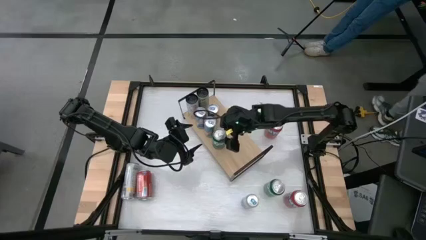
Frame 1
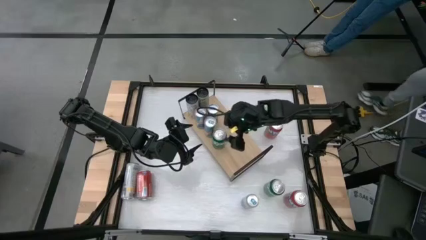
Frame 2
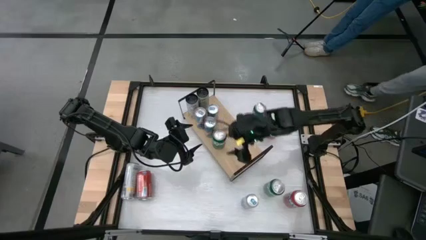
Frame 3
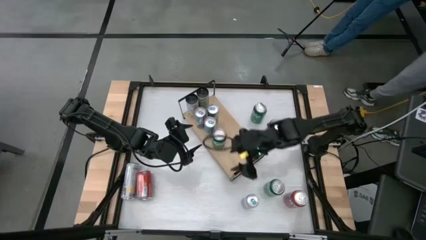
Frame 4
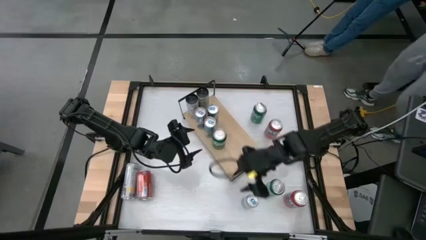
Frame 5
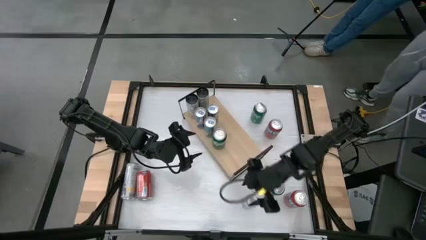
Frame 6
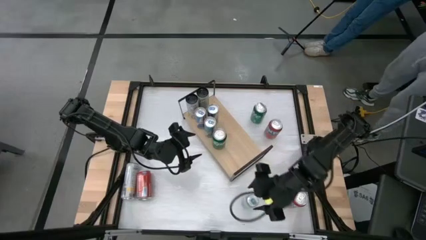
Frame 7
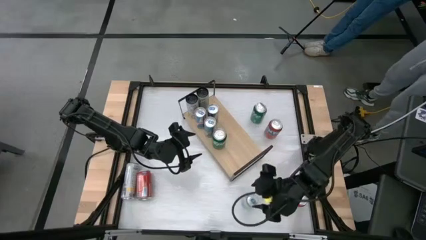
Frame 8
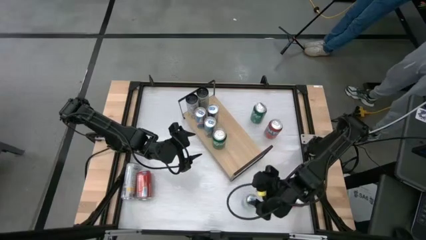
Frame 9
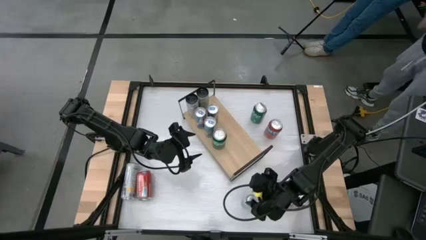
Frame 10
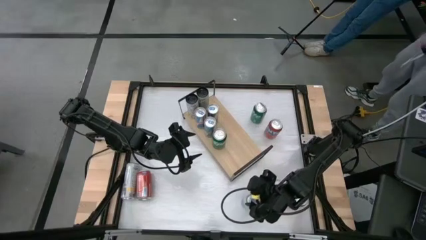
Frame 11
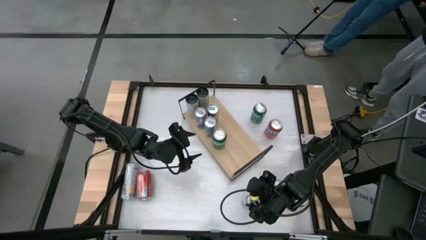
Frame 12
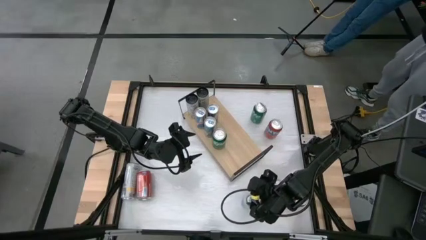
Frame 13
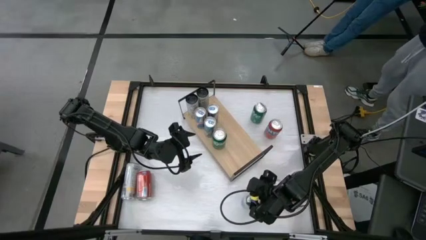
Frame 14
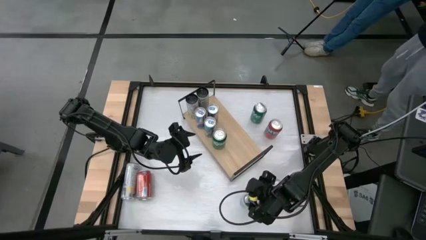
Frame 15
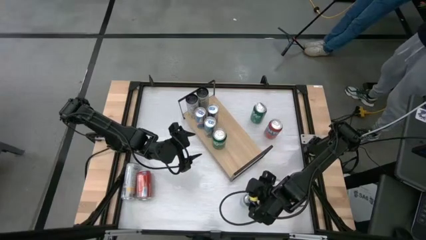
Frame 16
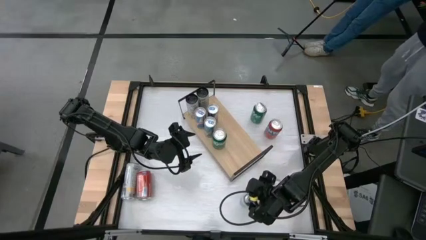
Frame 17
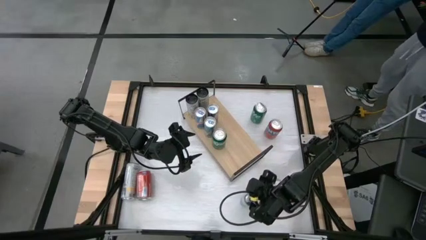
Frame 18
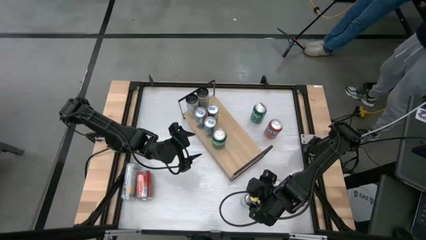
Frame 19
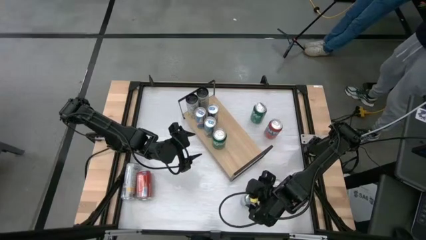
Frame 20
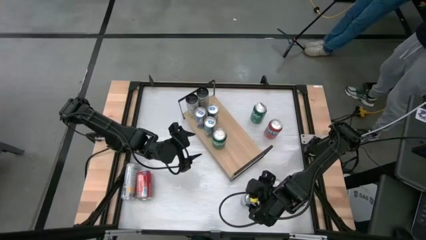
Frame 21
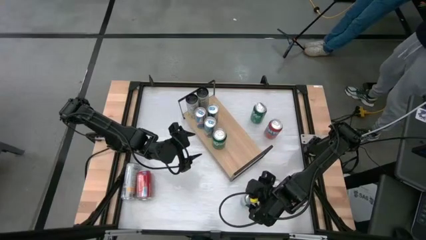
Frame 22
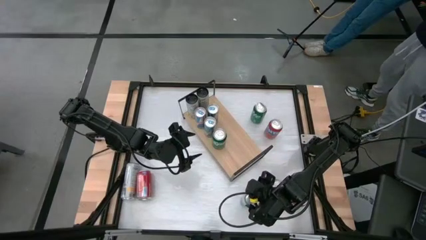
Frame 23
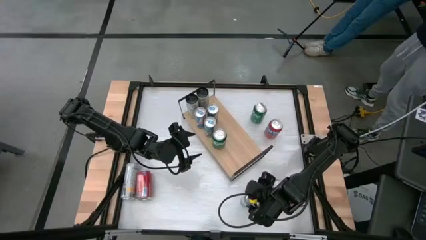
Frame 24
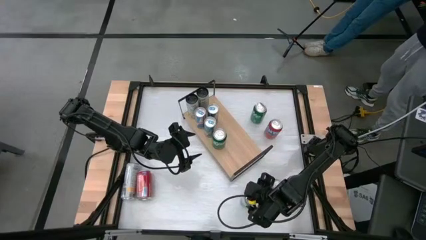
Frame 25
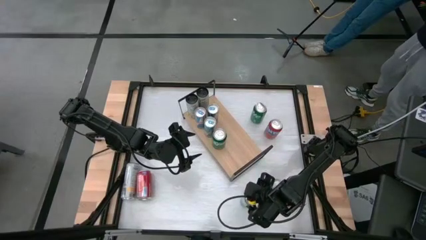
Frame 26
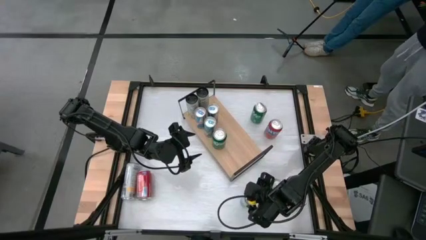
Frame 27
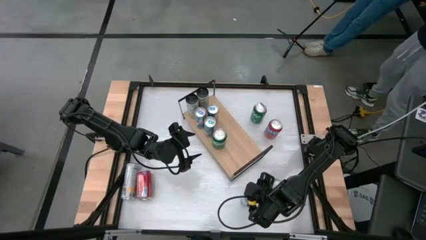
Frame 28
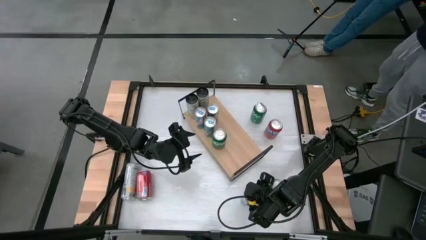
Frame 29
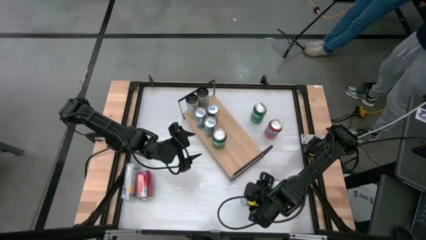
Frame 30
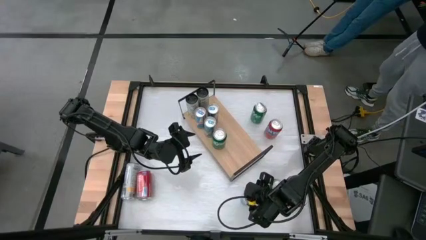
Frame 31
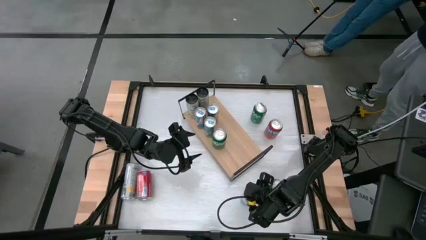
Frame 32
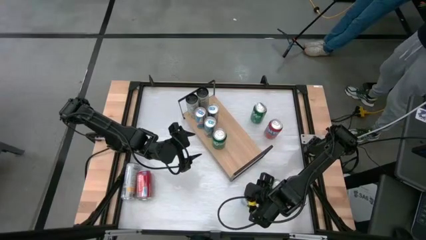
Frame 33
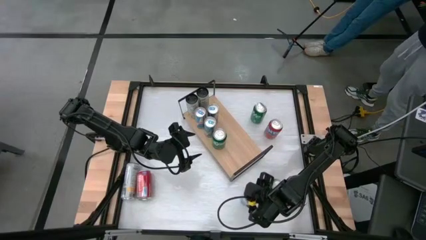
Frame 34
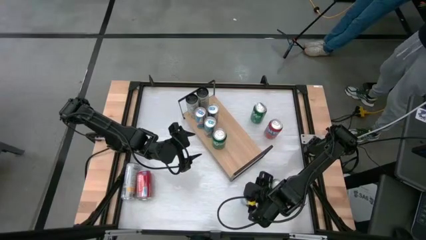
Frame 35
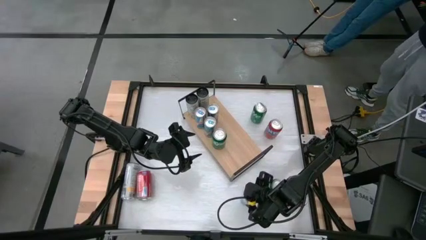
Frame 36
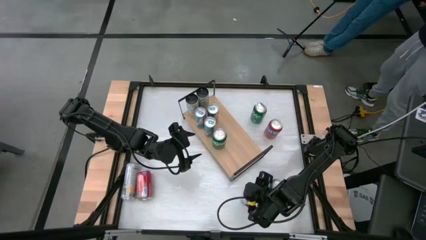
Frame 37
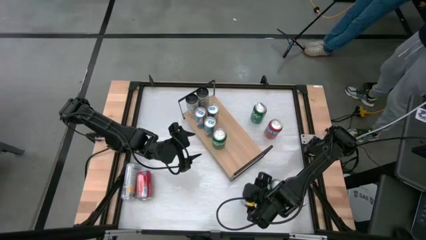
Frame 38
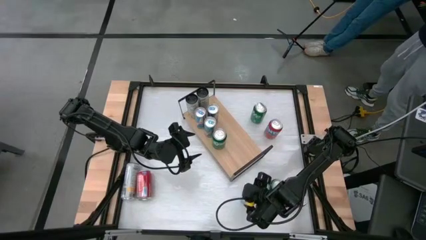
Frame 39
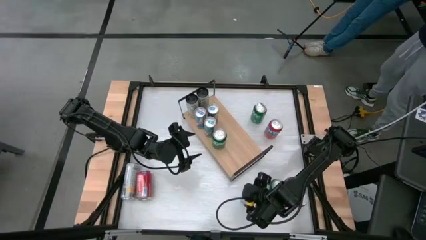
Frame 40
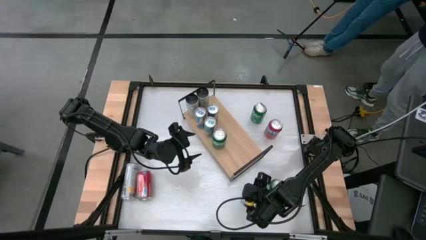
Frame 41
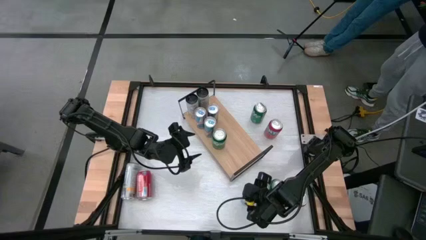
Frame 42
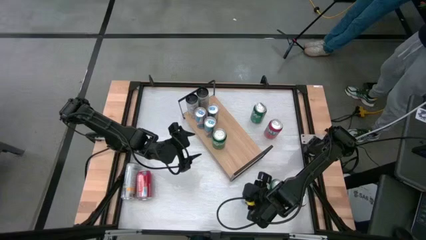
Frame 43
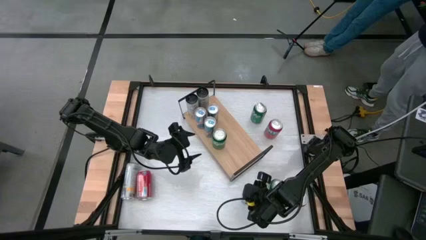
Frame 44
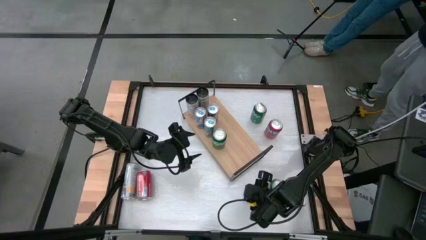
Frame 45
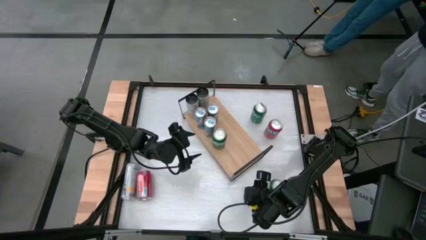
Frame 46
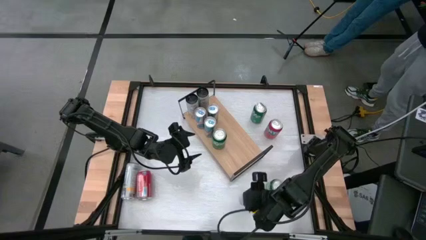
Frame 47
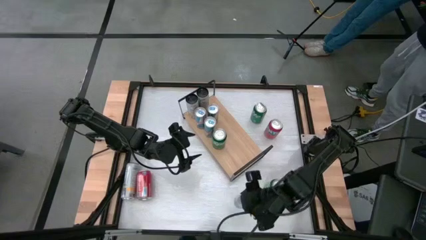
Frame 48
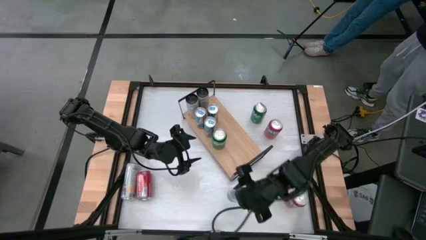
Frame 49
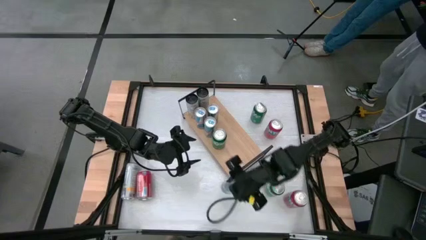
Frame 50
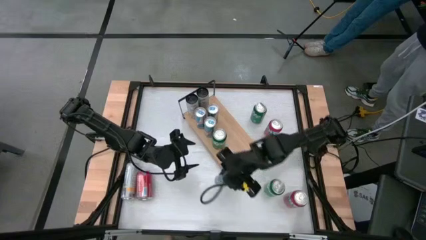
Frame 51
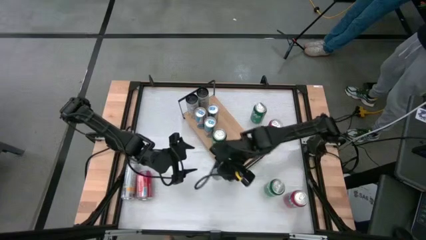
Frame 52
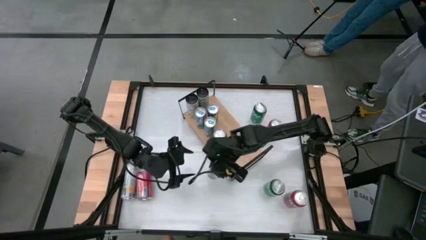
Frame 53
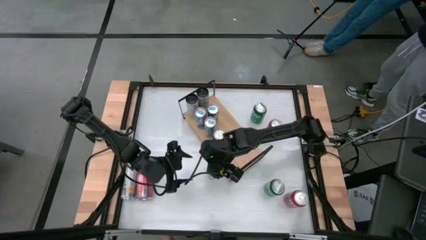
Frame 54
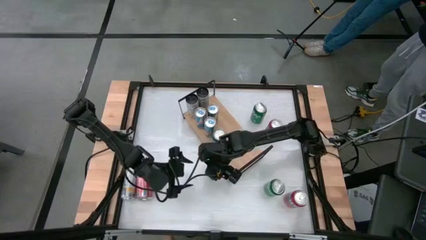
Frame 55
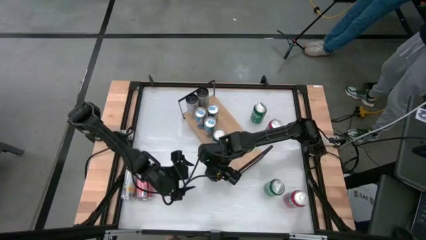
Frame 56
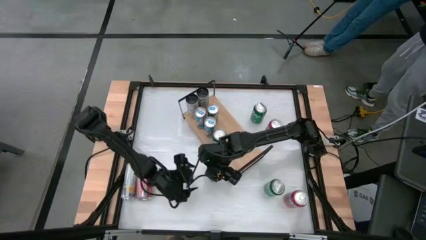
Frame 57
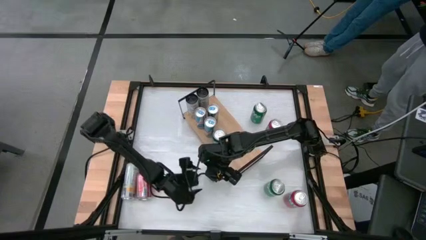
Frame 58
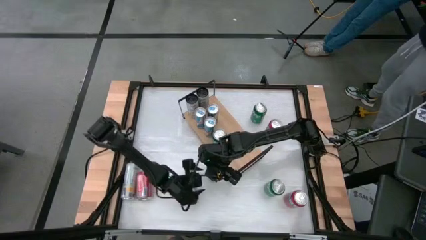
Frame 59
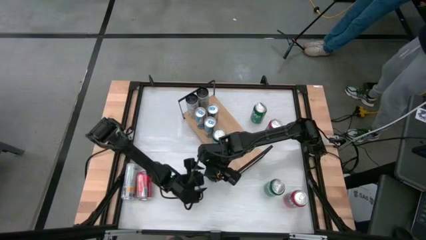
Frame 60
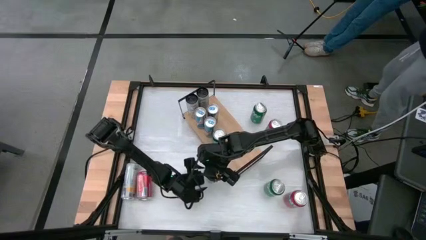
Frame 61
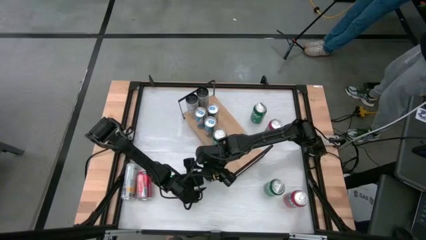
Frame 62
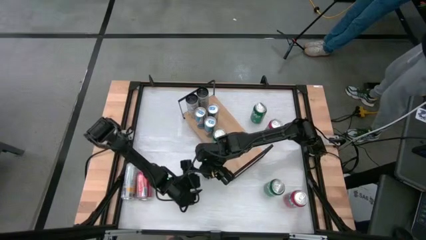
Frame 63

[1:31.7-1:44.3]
Task: Place canned beverage on shelf
Put the blue soda can on the shelf aligned with the other blue soda

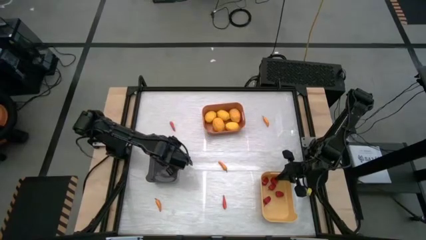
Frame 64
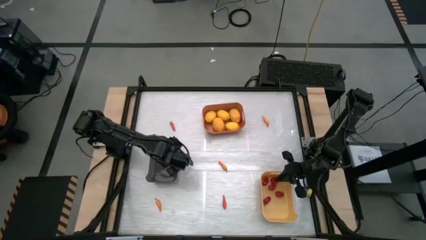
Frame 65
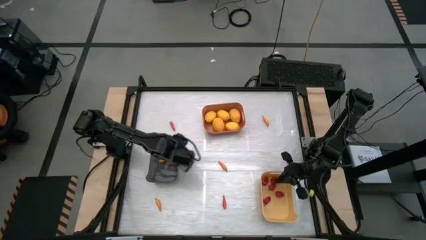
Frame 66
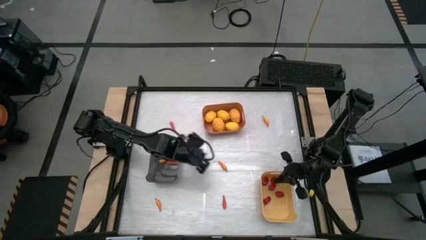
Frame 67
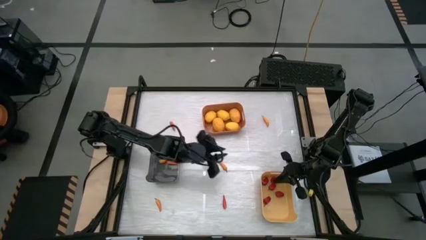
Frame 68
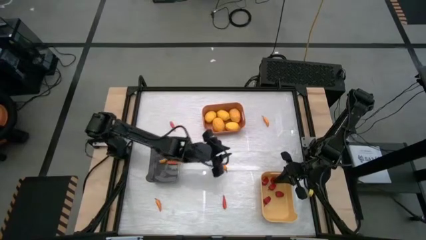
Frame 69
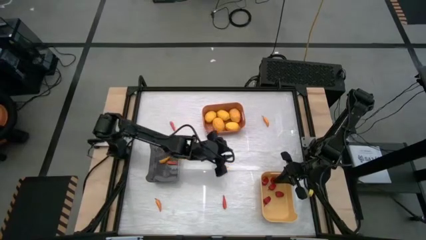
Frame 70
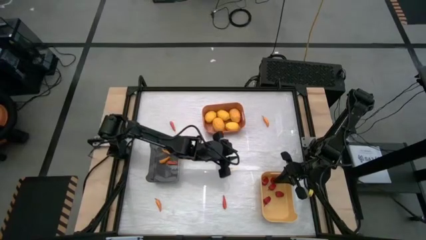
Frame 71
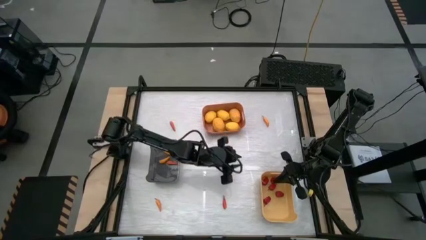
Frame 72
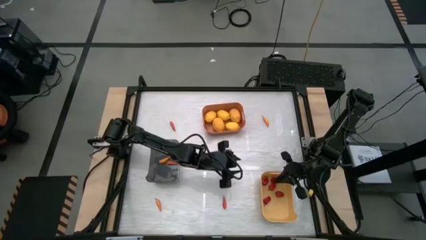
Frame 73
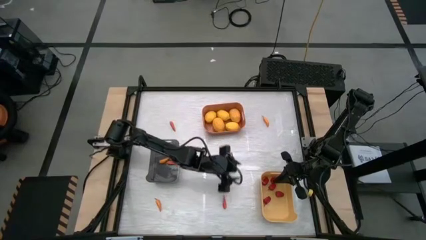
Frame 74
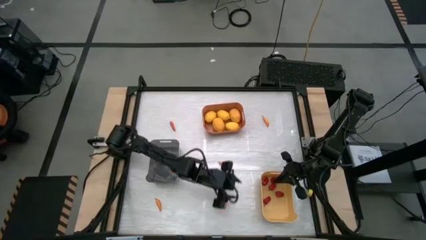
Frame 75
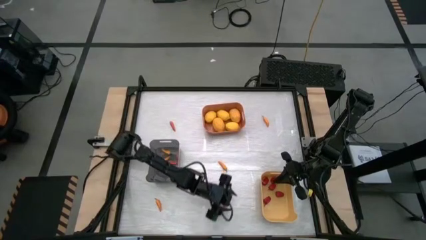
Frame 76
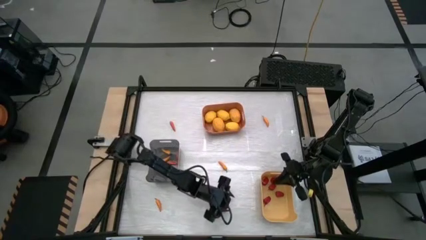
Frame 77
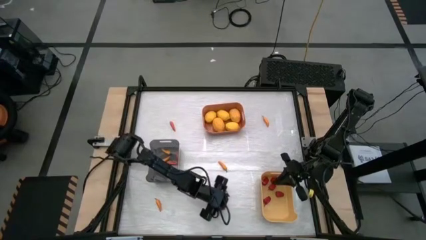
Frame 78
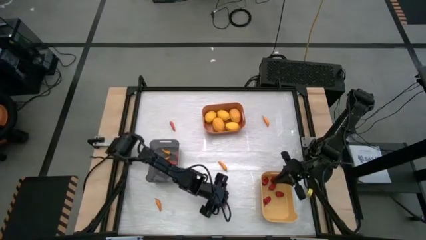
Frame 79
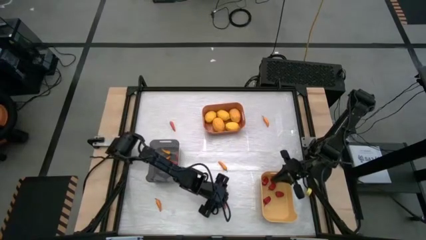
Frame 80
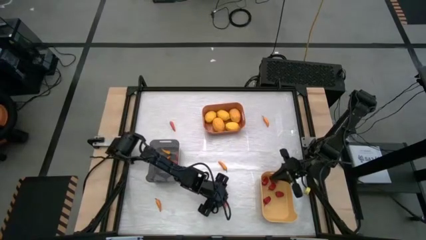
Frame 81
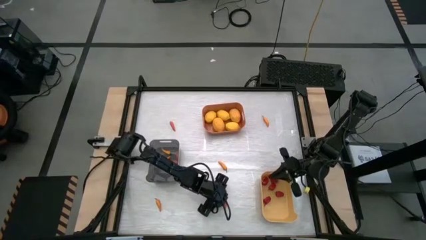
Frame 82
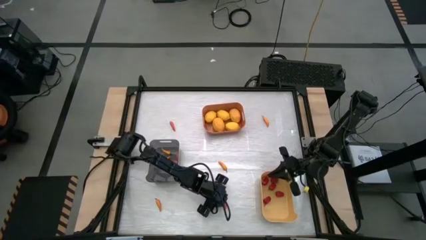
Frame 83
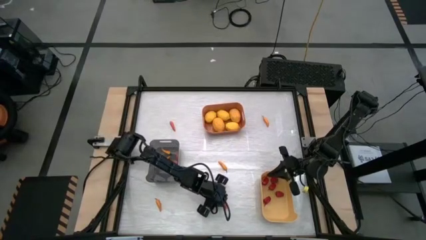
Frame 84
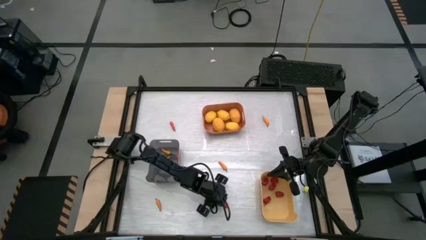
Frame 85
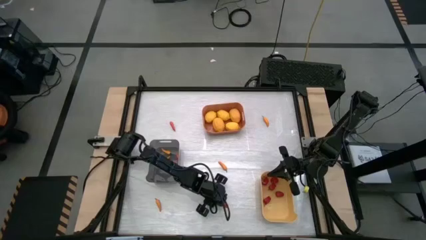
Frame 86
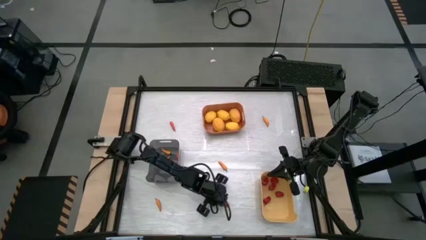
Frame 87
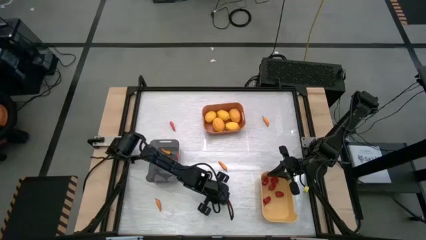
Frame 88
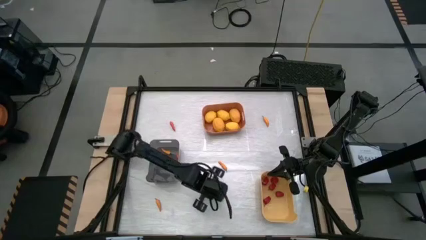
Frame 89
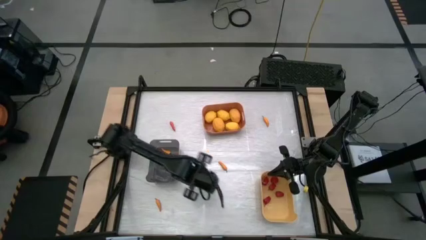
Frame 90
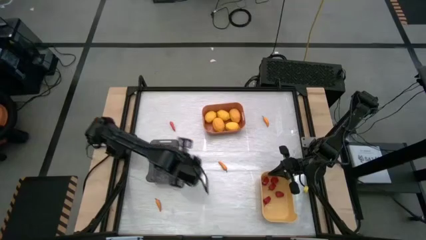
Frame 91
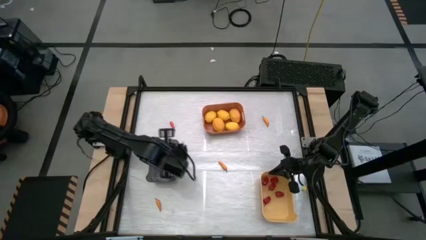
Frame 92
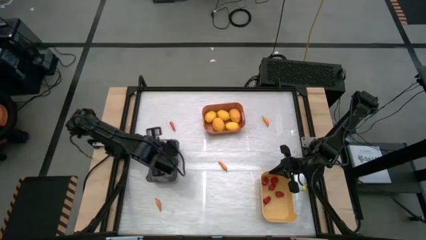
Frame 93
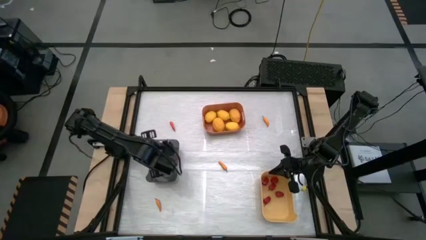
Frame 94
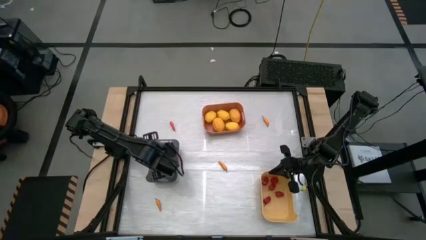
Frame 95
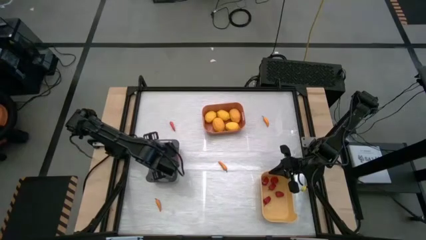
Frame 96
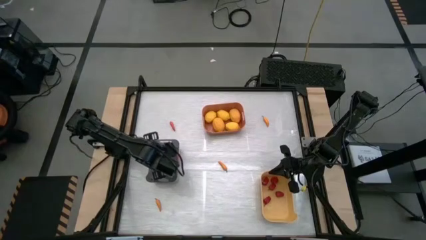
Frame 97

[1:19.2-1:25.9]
Task: Sort produce into baskets
Put the orange chili pepper into the black bin
